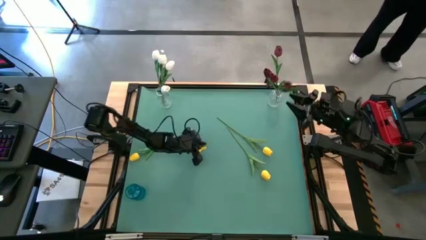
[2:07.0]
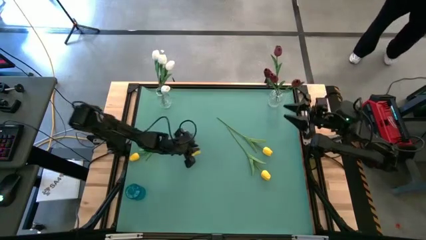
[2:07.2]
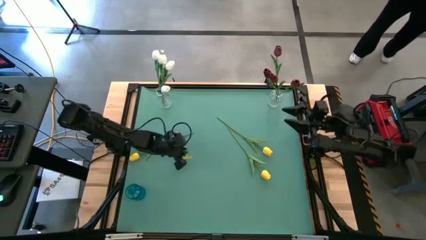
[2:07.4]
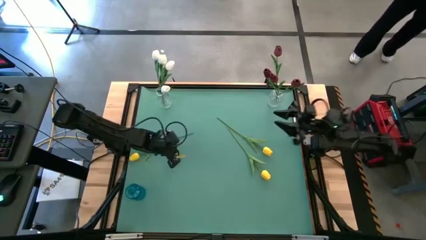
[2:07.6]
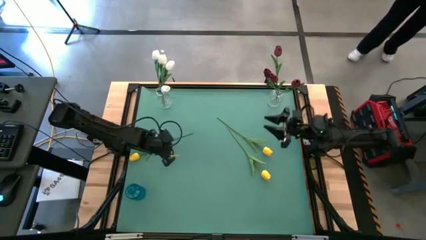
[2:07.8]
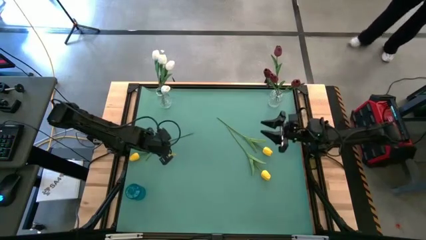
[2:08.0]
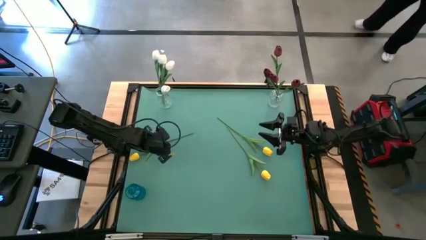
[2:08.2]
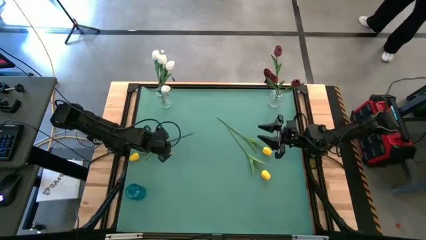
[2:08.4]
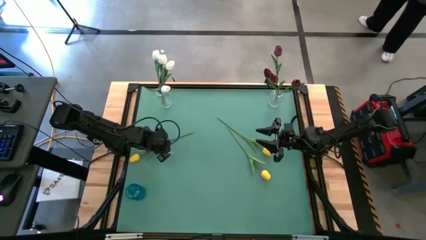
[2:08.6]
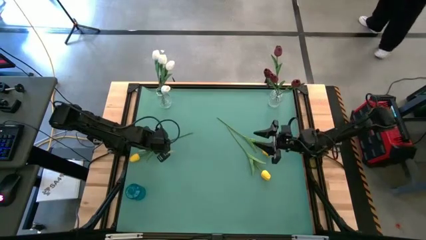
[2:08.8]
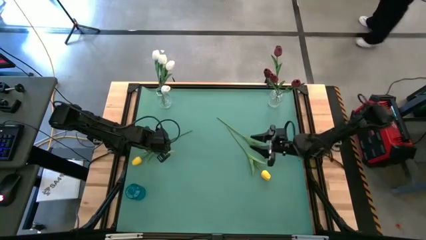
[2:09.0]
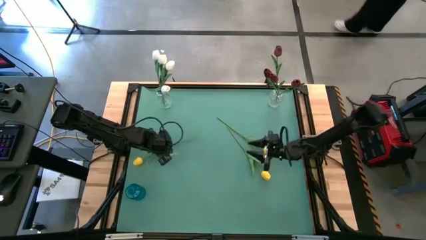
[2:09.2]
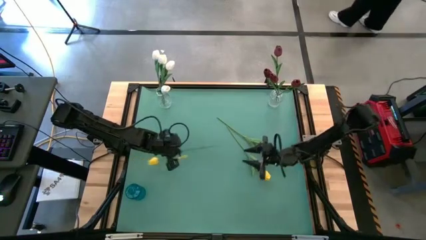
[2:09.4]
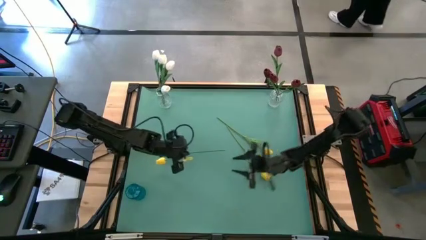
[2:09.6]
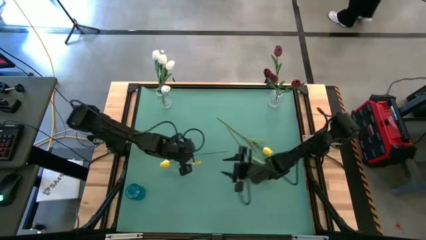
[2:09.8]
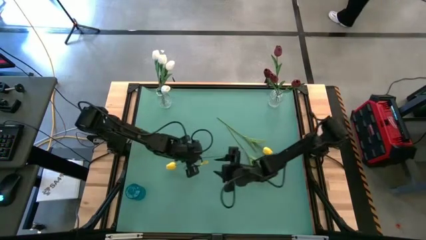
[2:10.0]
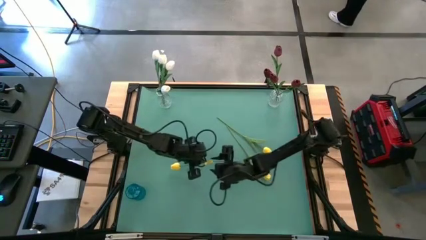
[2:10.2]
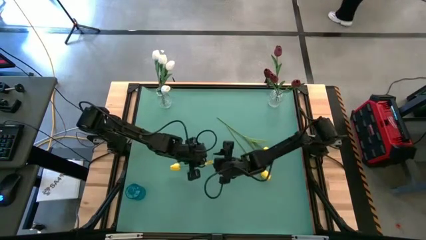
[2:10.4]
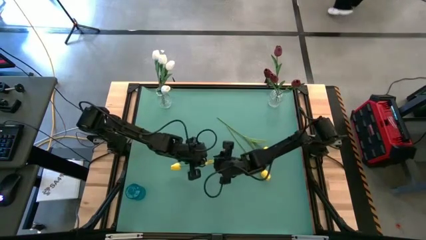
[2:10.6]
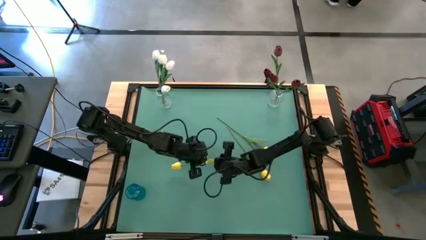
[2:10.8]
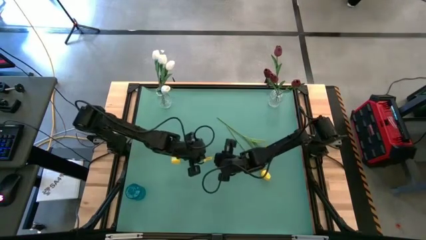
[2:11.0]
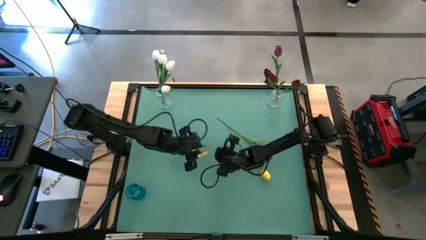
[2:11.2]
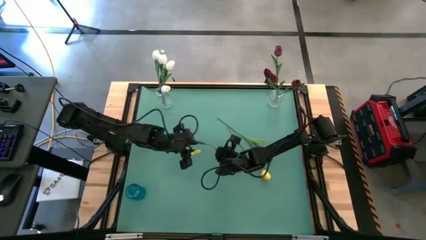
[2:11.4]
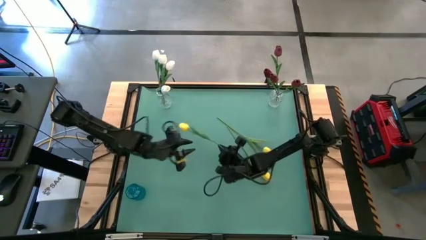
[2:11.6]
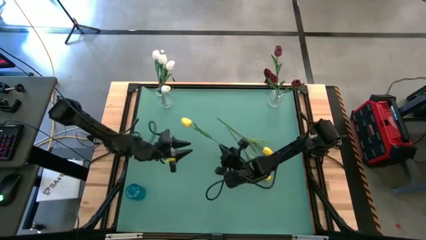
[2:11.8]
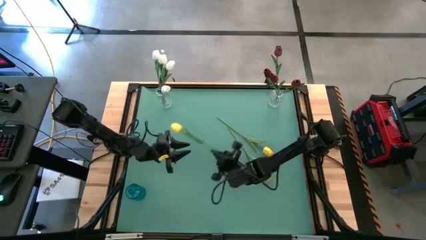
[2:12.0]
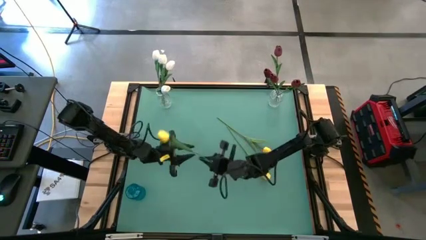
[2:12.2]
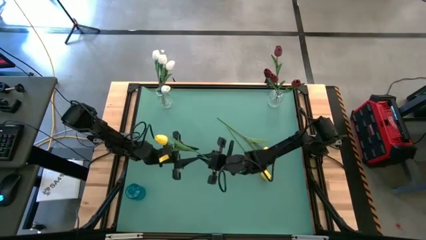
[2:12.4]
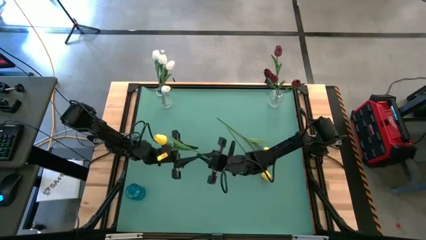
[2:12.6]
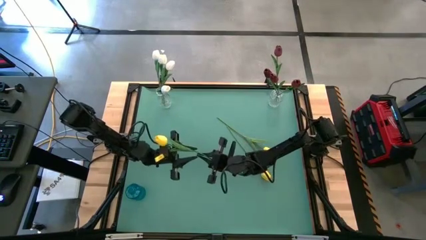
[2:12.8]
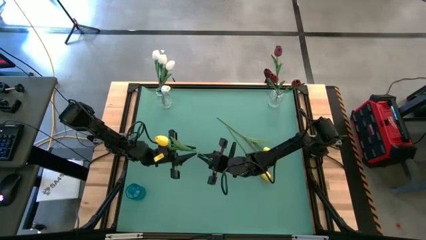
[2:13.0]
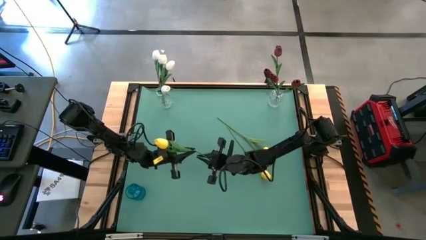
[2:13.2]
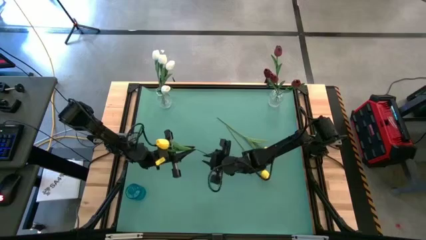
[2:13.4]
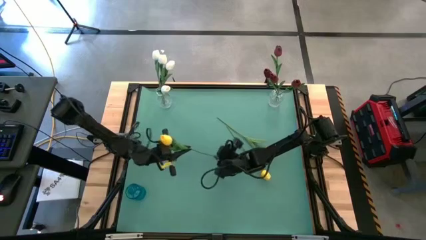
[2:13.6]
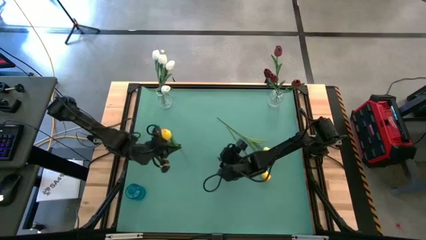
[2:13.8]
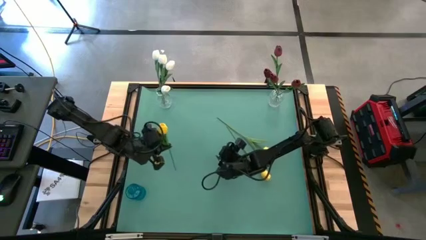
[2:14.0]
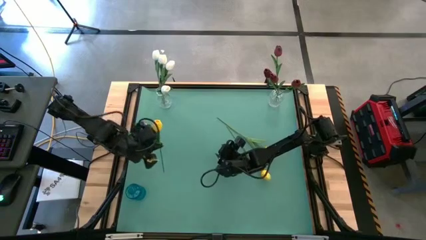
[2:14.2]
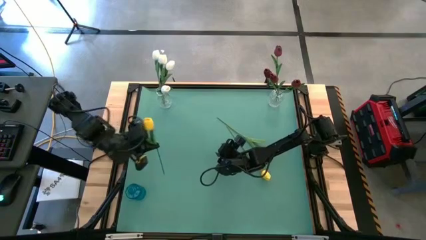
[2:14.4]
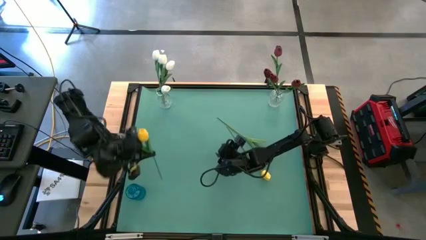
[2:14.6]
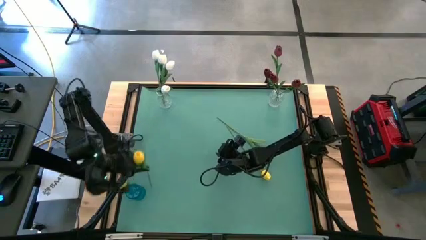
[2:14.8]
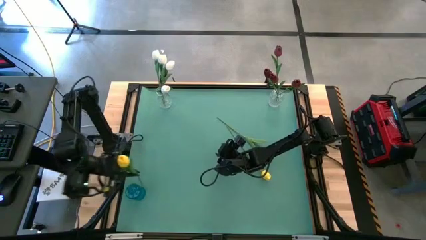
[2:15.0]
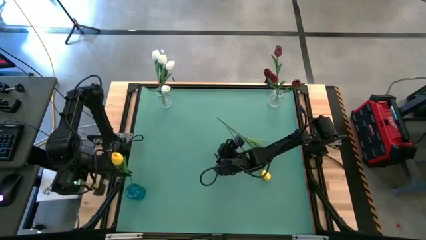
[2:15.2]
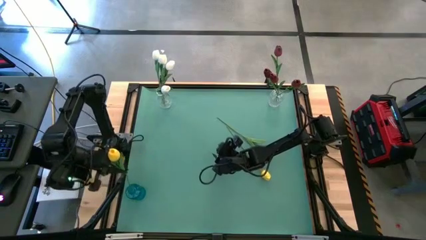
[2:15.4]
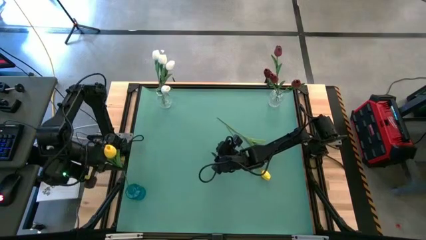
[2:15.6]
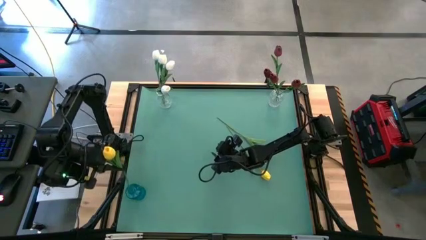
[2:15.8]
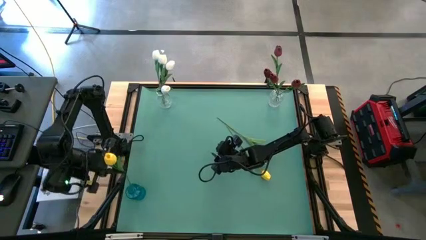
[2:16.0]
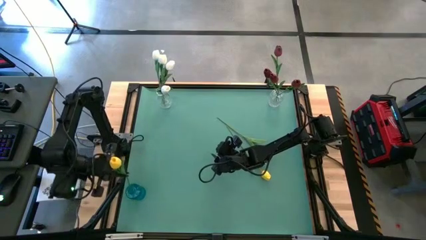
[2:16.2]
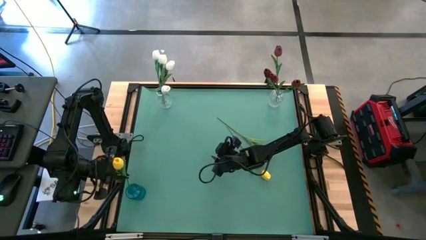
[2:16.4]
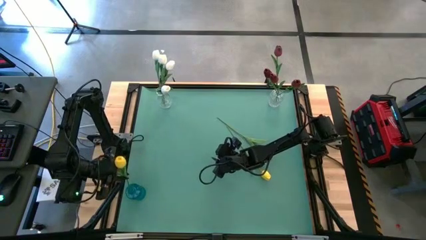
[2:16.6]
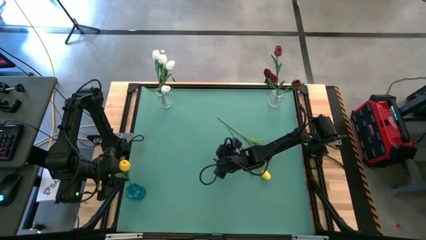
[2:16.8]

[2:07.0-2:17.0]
Task: Sort flowers into vase by color
Put the yellow flower into the blue vase

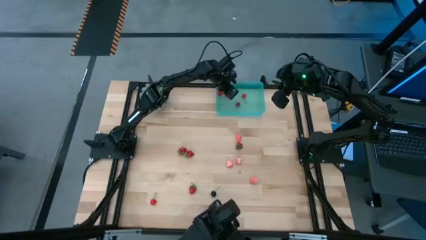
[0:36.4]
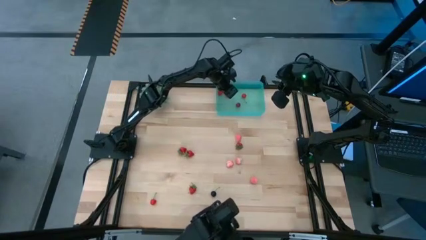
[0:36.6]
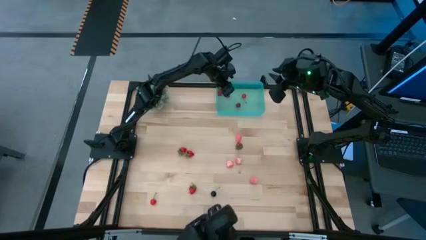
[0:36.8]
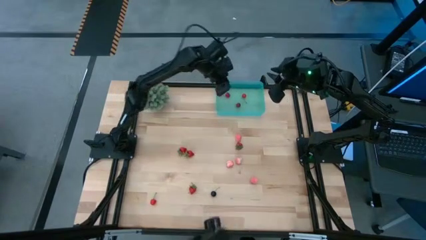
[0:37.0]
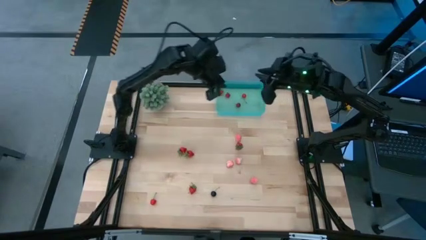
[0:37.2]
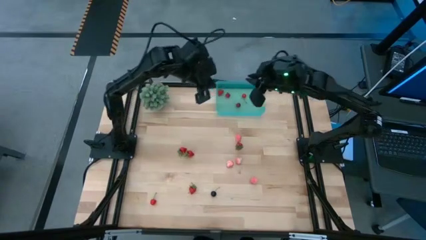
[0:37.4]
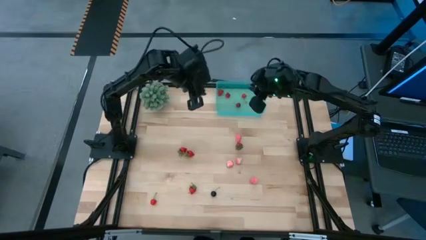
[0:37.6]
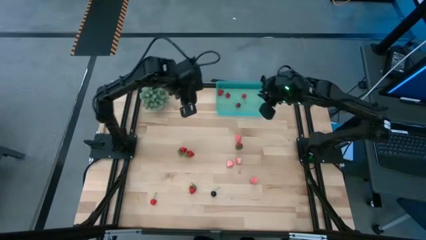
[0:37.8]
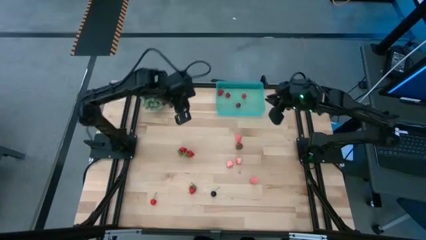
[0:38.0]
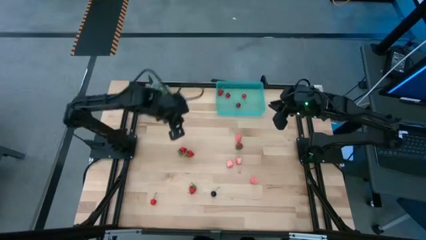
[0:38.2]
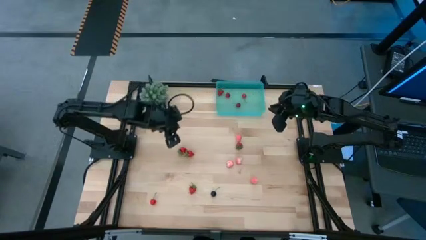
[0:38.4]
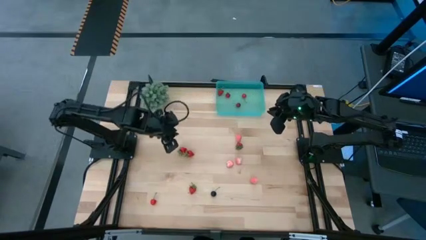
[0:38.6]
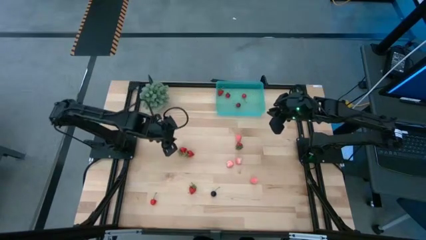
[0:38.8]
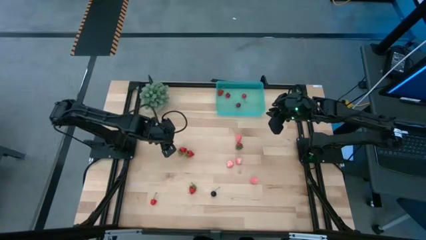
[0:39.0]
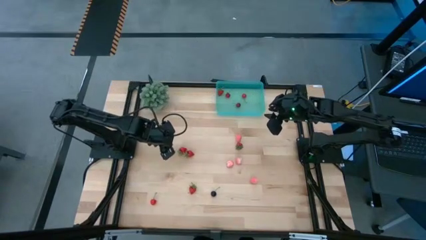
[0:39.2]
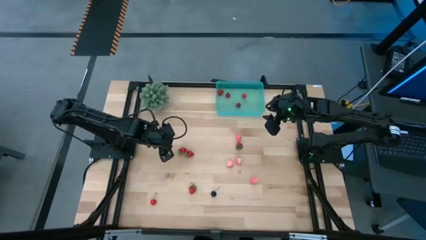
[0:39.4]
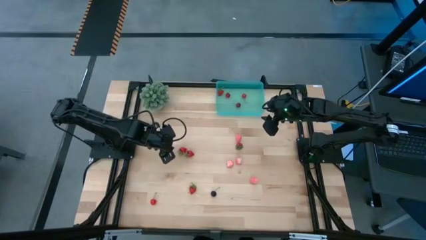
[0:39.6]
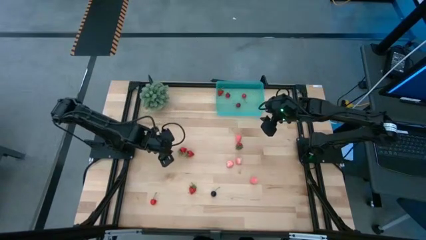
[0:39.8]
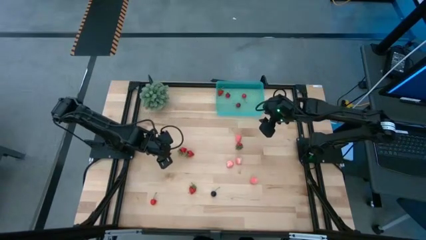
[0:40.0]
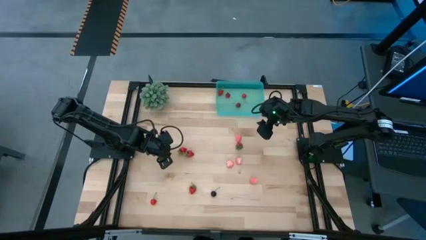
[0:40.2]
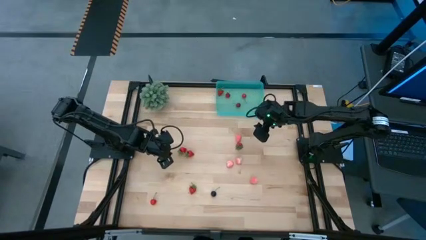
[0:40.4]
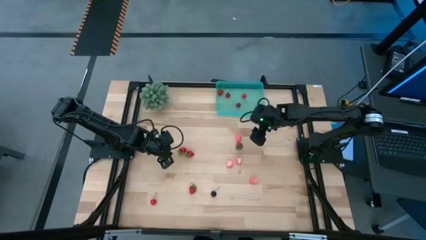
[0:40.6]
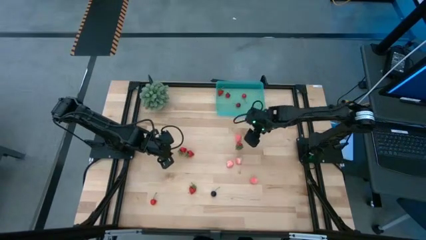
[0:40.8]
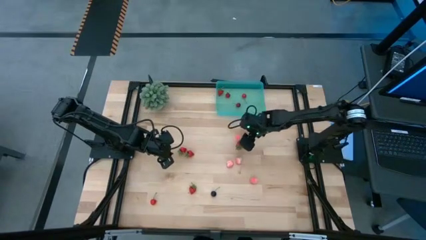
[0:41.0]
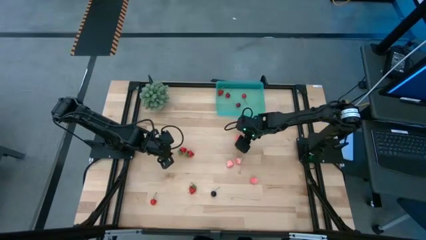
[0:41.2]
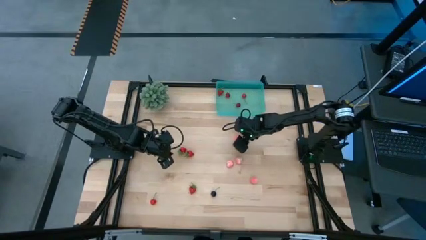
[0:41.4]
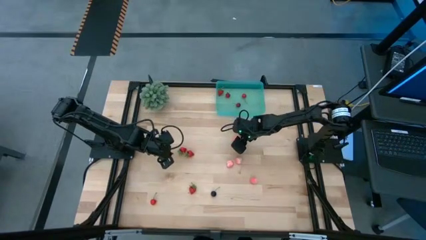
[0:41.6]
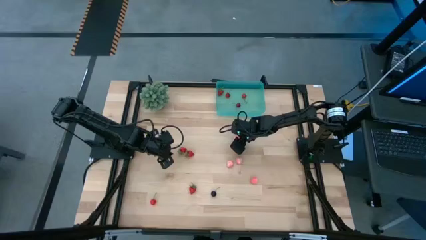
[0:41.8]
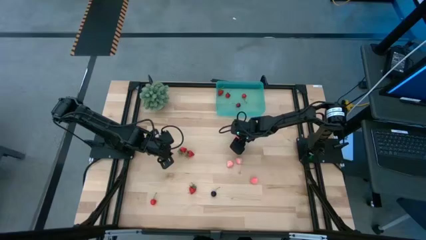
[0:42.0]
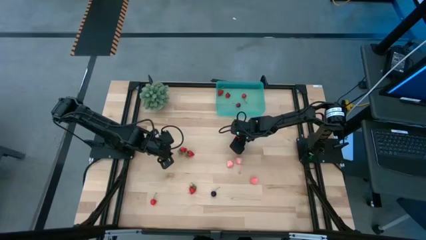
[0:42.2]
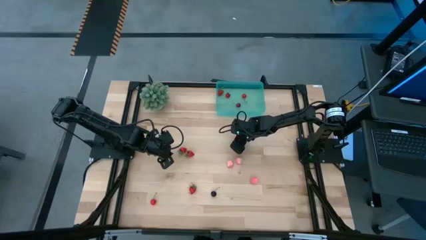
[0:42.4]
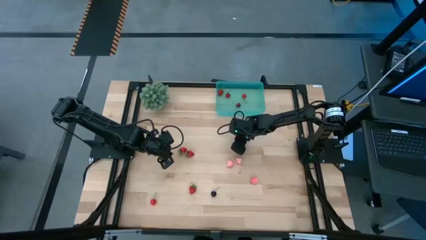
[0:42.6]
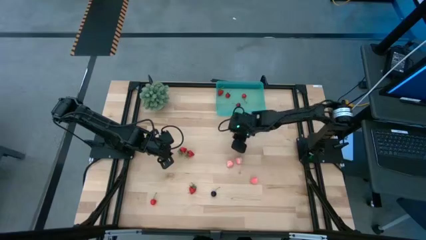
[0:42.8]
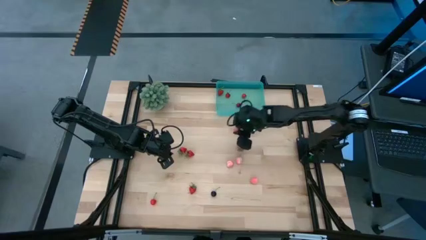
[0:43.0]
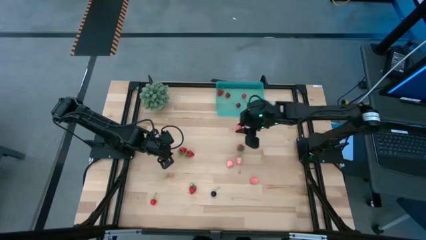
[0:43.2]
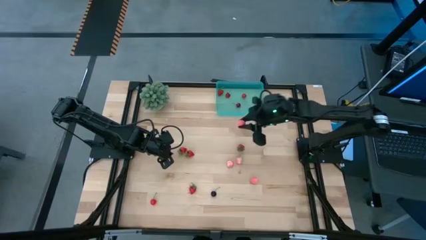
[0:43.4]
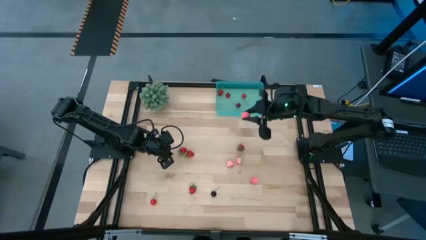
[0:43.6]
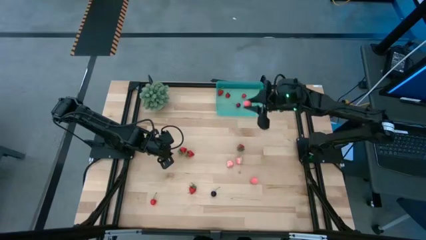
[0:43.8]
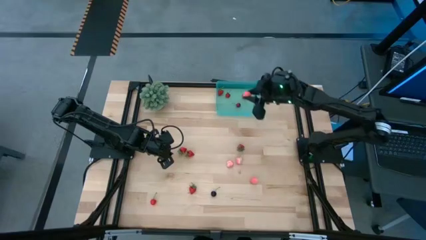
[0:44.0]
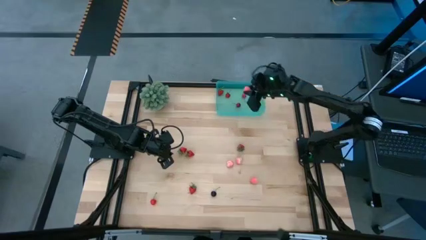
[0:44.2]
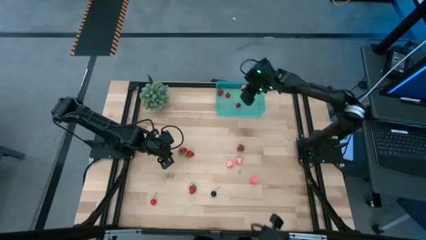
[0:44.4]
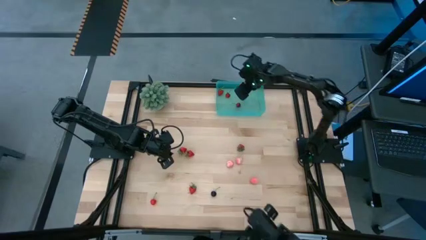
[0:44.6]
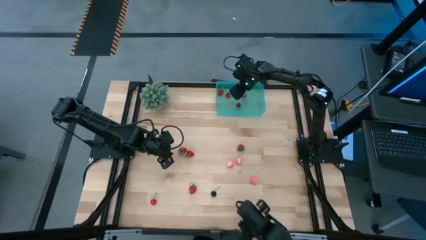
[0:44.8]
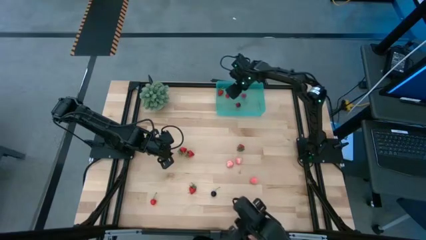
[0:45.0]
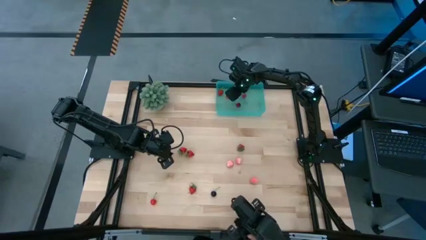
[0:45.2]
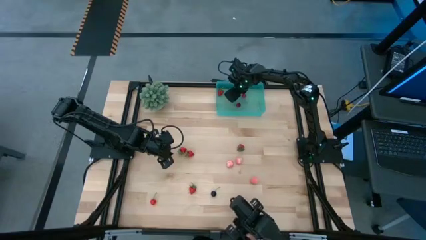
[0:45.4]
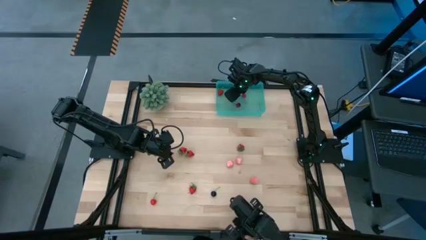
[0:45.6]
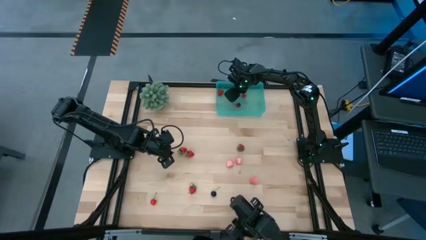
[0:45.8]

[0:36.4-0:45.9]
Task: Pick and placing Produce into tupperware
Put the peach into the blue bin
